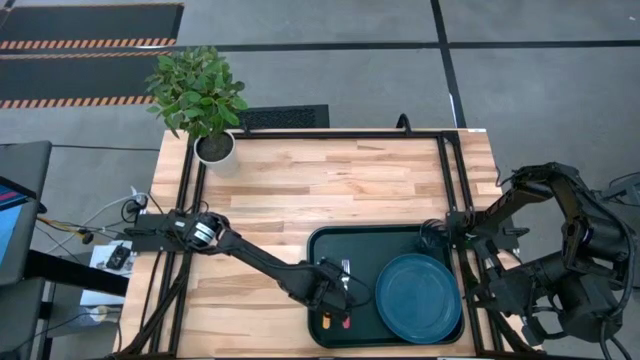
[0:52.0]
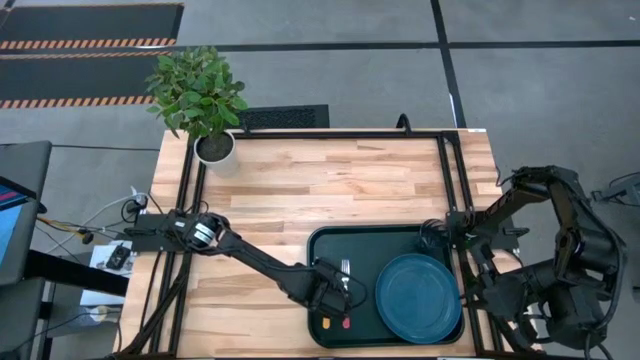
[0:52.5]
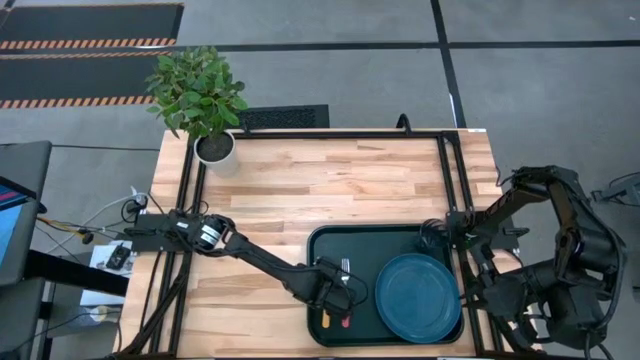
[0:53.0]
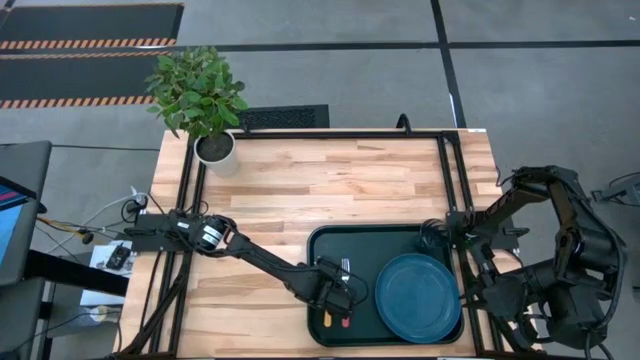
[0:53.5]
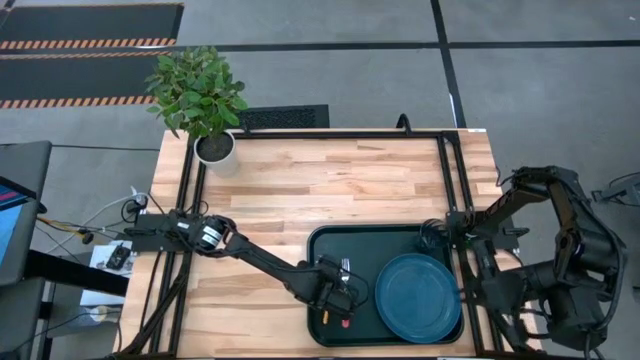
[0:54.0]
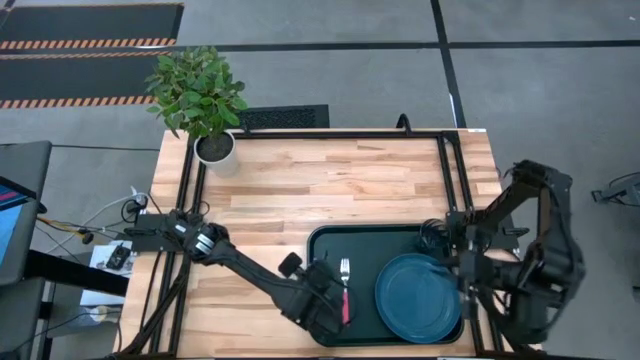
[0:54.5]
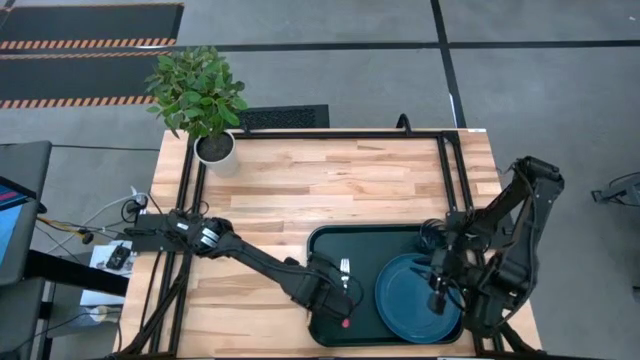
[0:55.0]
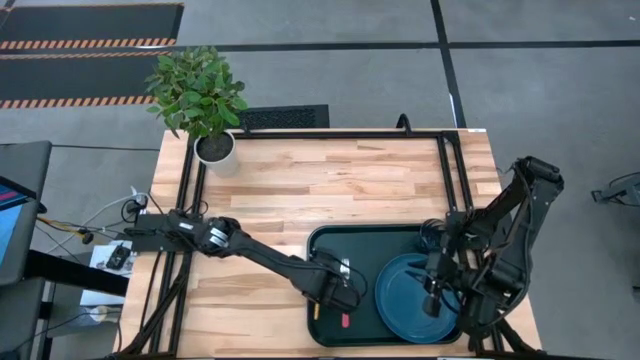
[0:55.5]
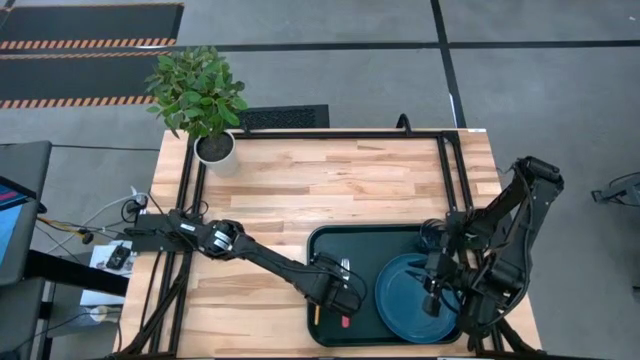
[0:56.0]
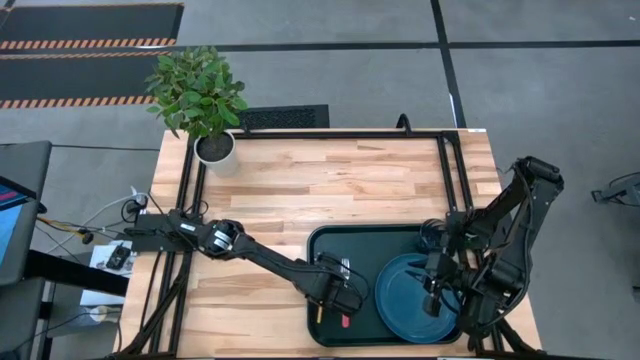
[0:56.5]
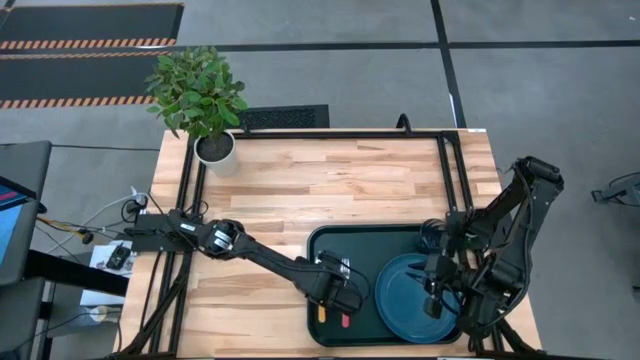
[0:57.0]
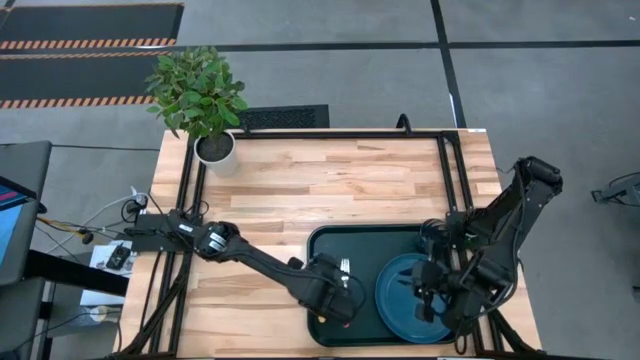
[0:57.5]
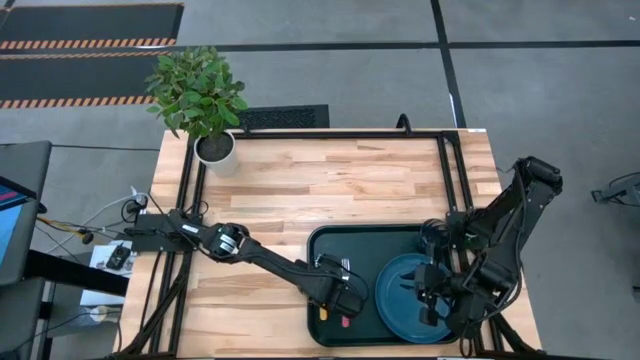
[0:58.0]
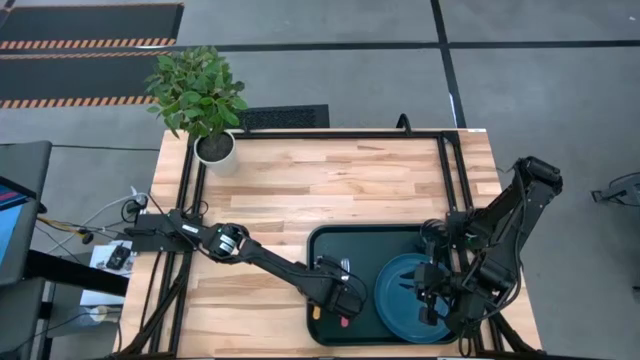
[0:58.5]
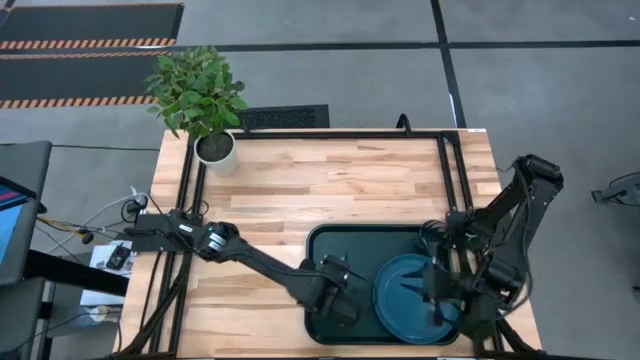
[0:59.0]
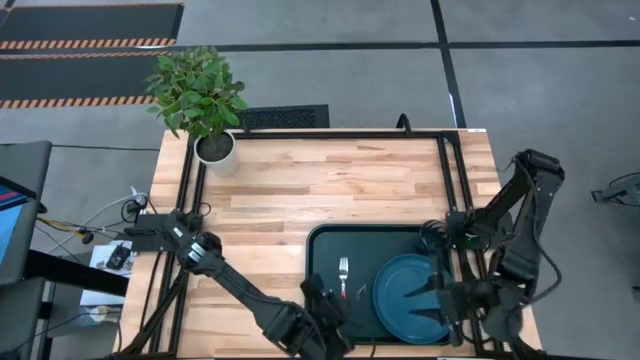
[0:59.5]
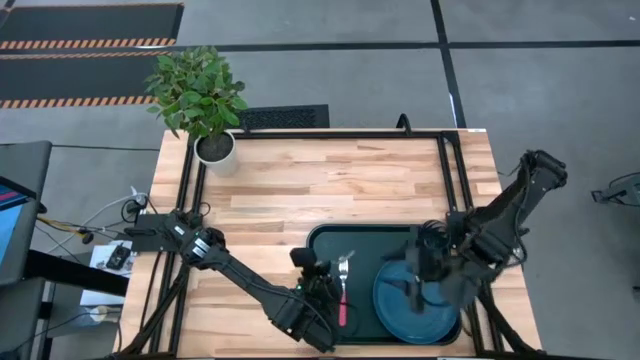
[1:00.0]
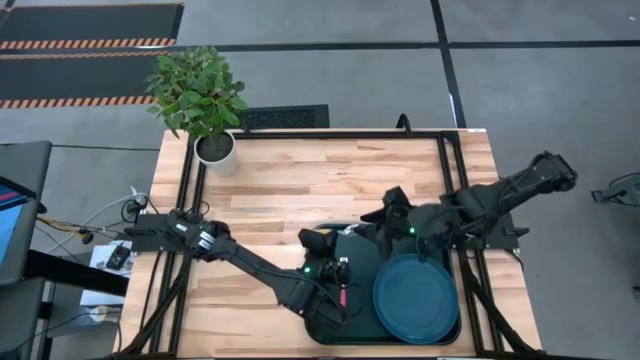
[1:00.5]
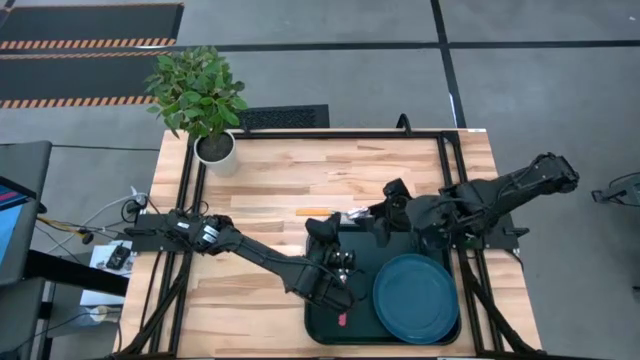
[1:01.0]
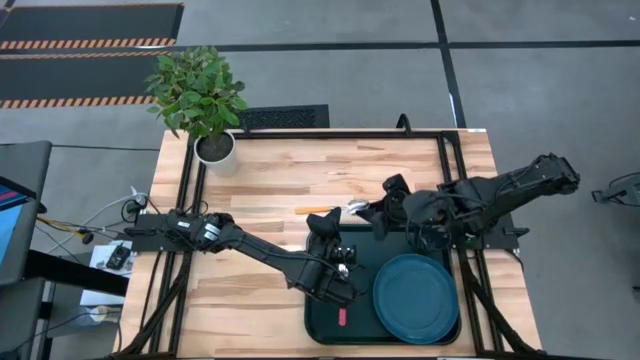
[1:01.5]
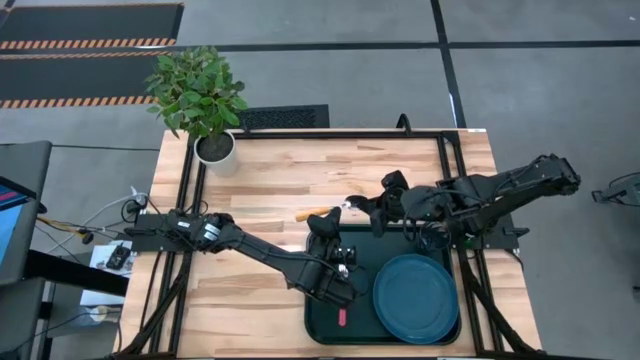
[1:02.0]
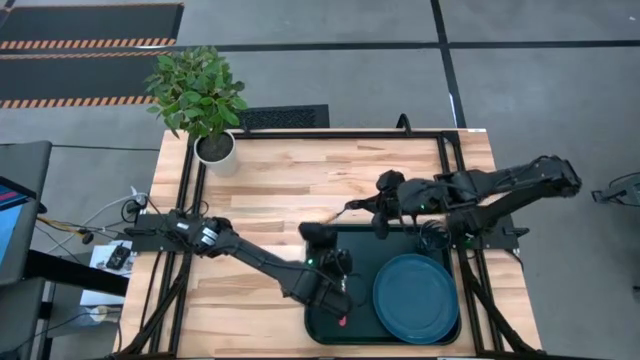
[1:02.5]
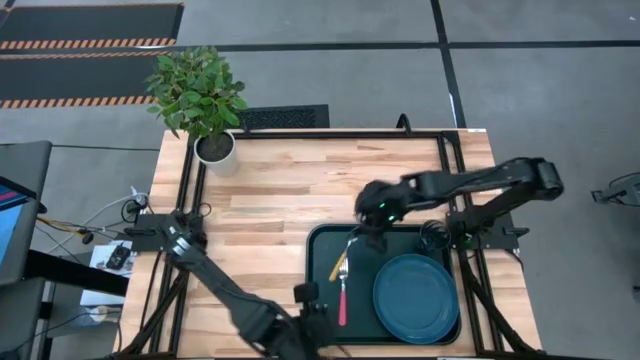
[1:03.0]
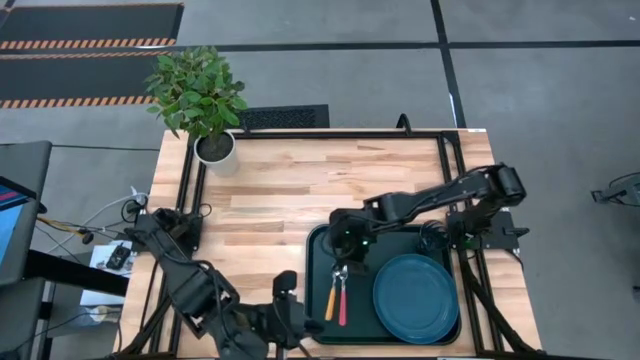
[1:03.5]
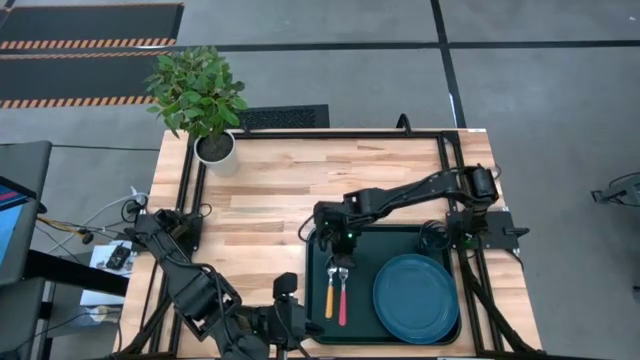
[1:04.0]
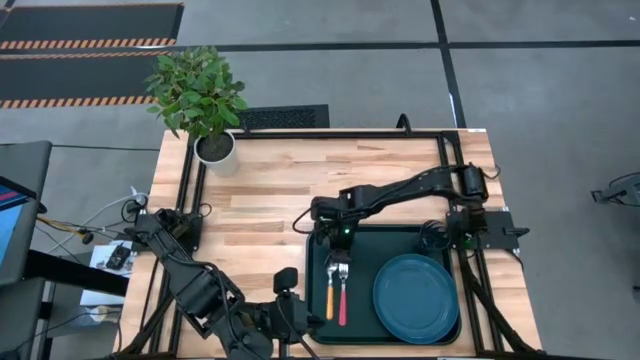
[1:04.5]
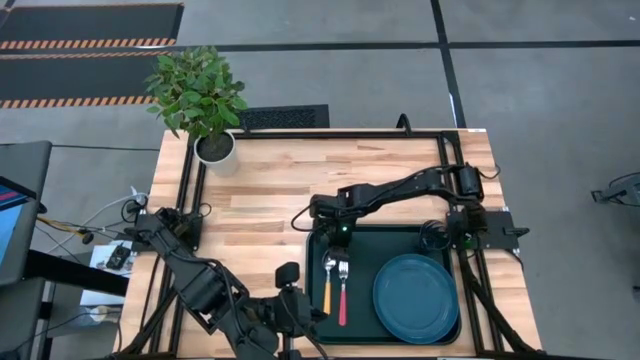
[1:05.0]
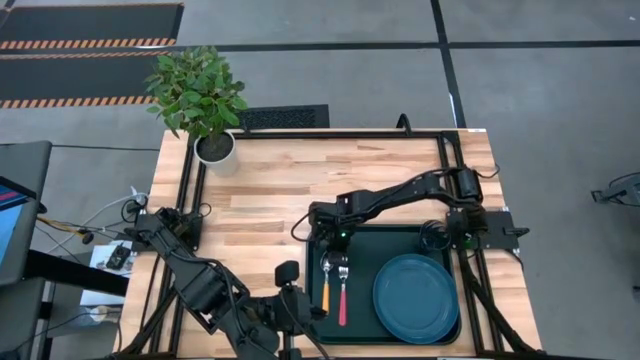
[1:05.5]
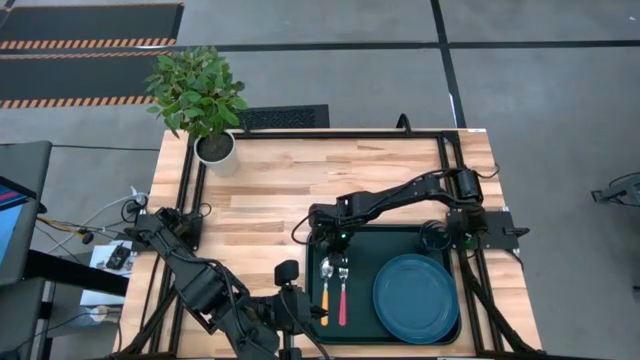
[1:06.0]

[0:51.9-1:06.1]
Task: Pick and place plate/cup/fork/spoon on tray
Put the yellow spoon on the black tray

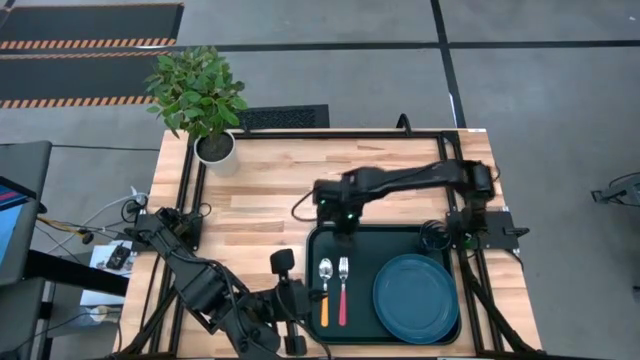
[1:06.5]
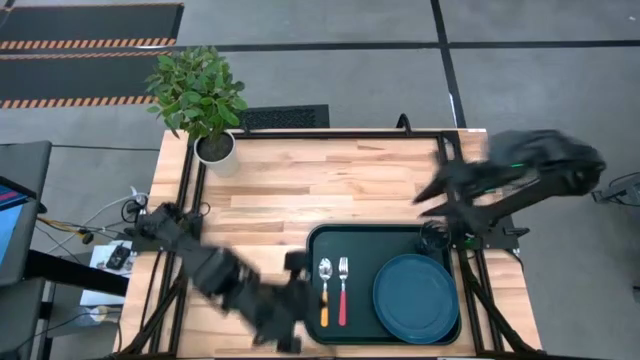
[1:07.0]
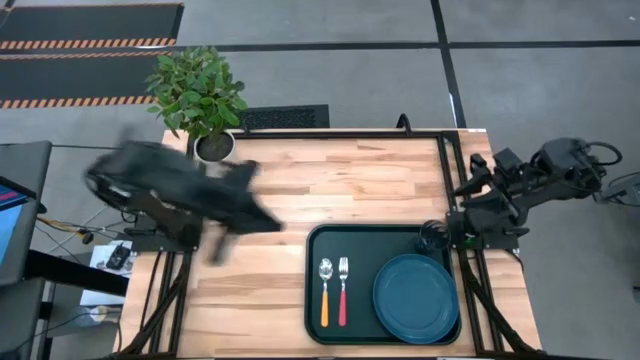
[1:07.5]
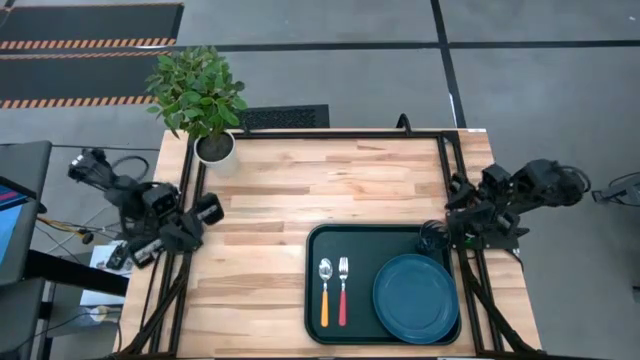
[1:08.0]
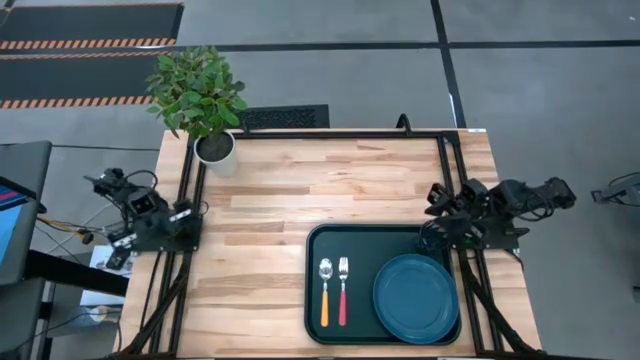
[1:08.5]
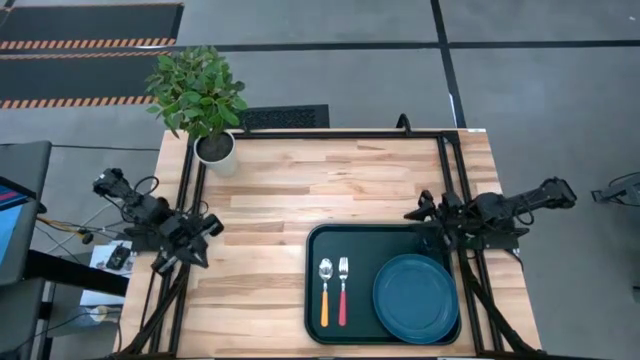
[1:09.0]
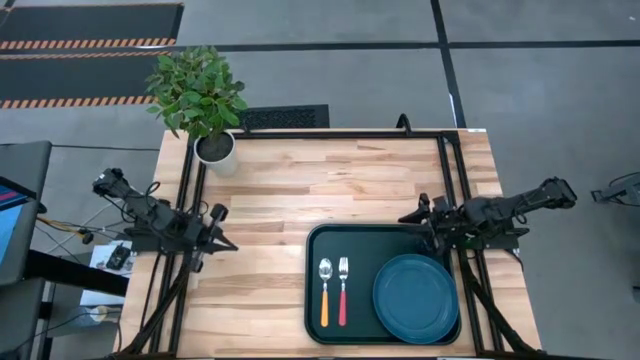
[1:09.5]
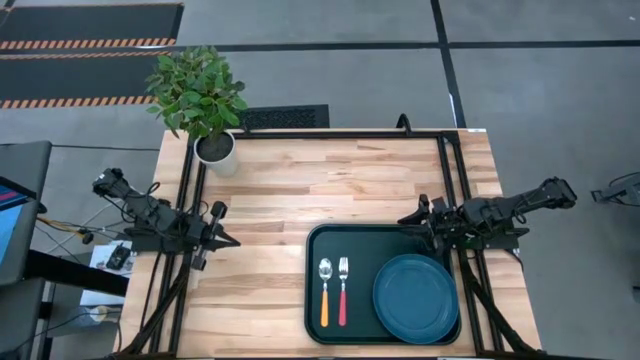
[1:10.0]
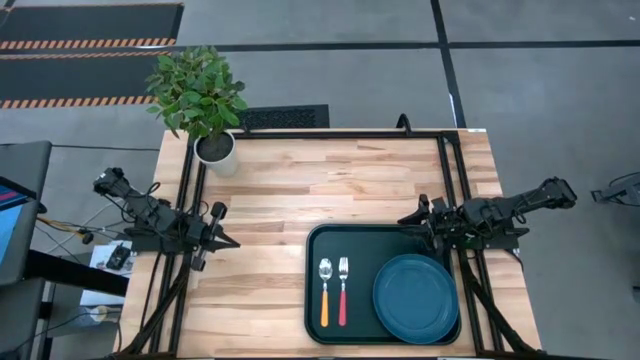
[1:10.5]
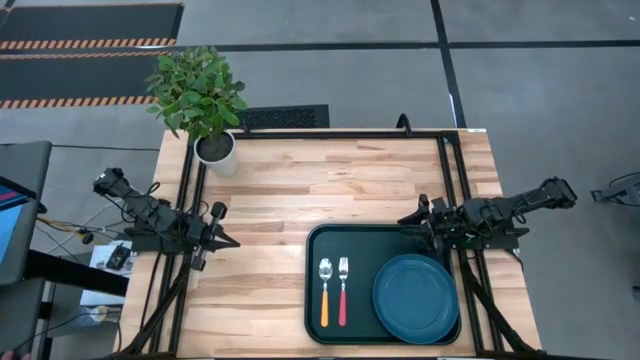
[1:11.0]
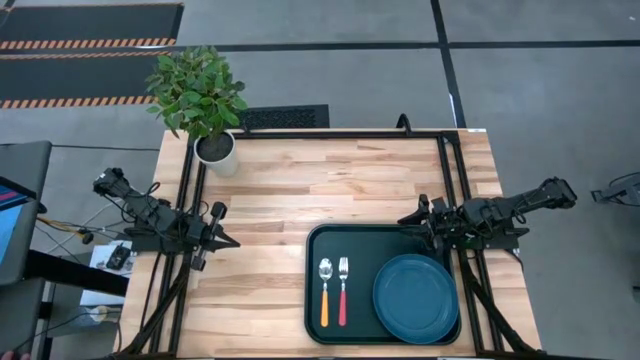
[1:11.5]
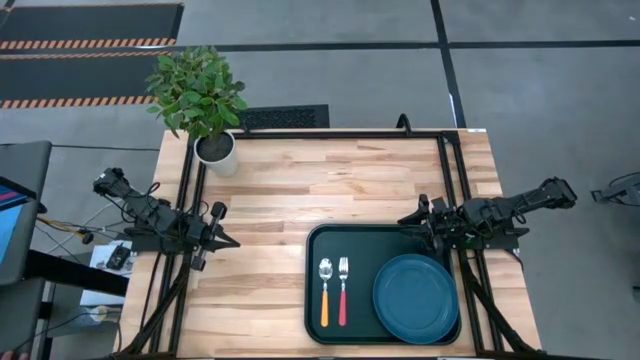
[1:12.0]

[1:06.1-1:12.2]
Return to Home Position

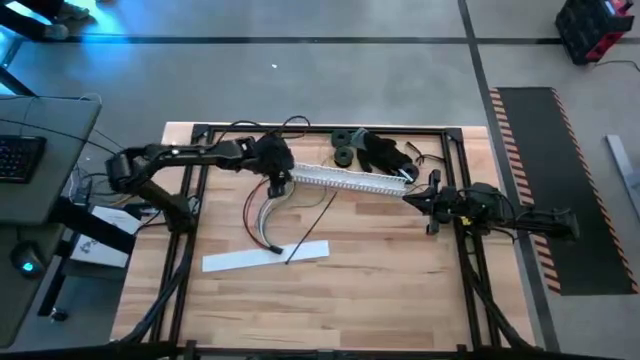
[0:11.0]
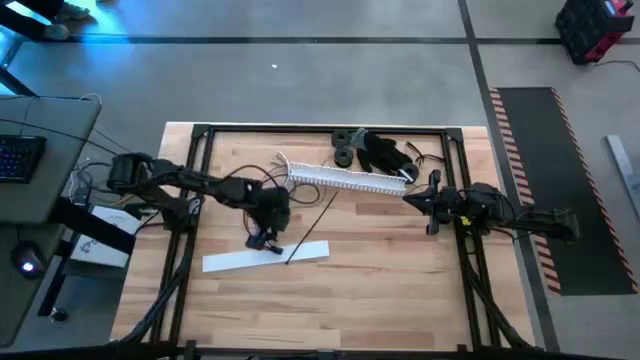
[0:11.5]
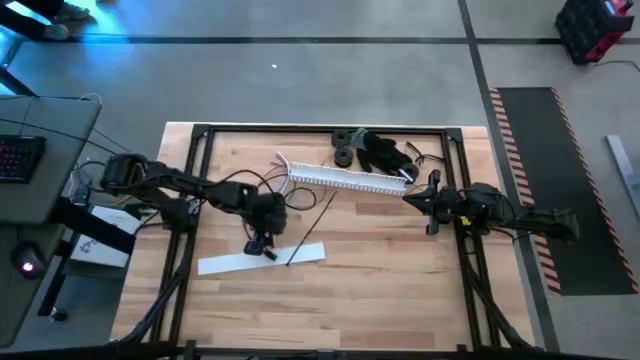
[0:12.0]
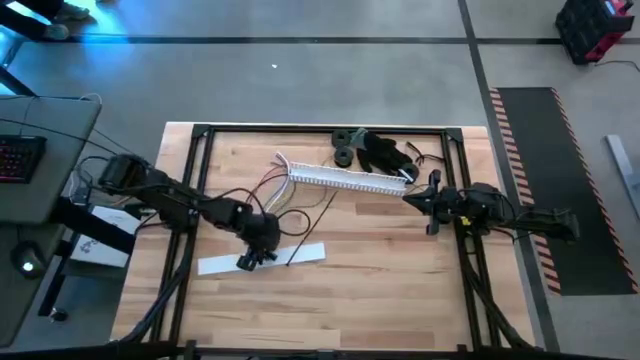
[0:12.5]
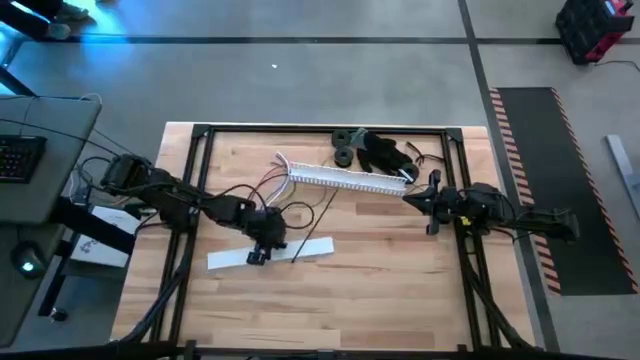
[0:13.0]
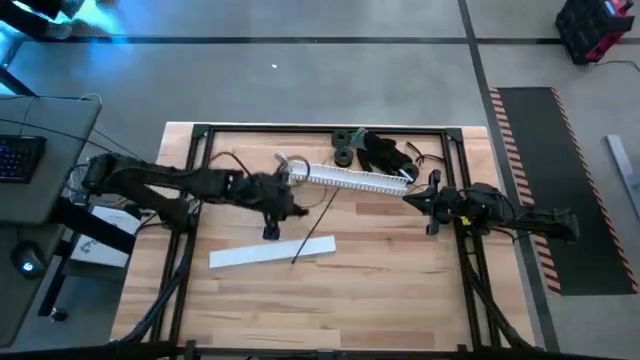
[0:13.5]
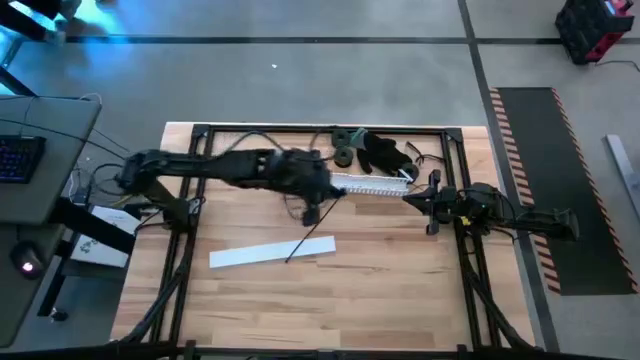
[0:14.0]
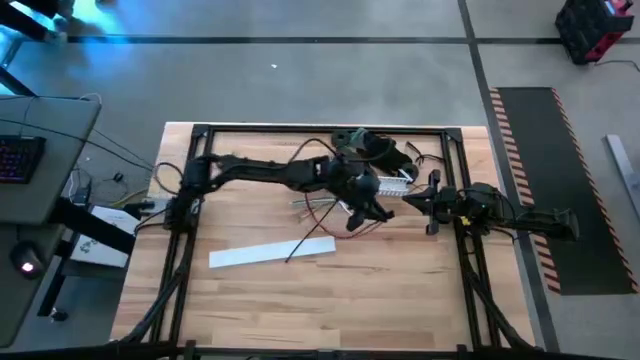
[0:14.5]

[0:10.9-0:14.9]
Task: Ziptie cables
Adjust the cable wires
